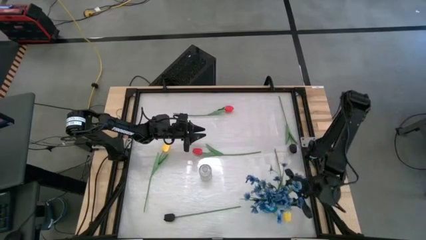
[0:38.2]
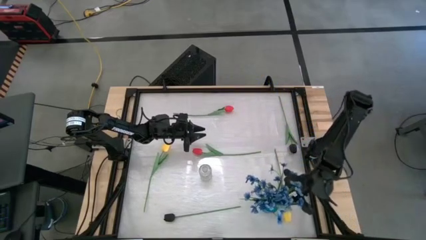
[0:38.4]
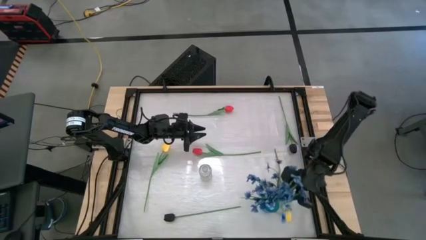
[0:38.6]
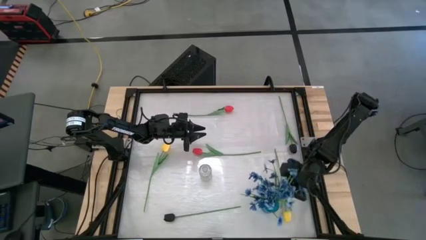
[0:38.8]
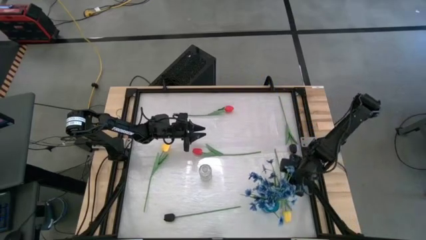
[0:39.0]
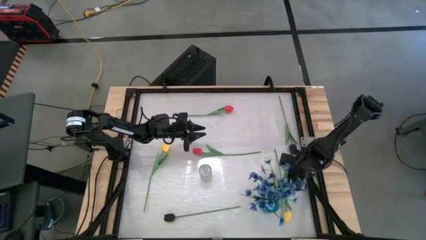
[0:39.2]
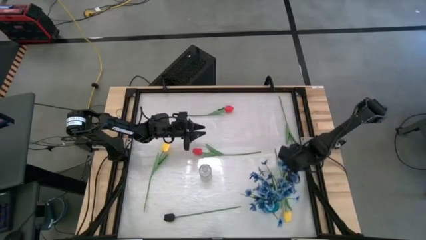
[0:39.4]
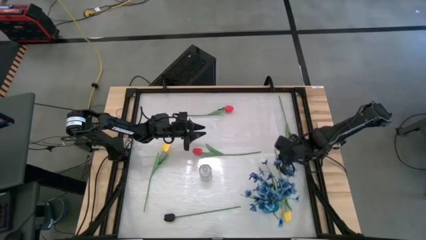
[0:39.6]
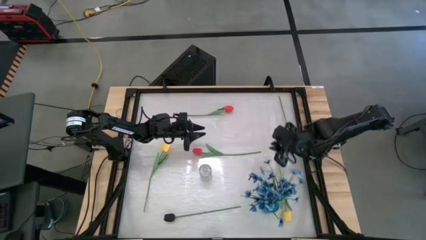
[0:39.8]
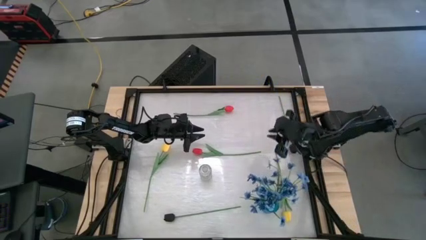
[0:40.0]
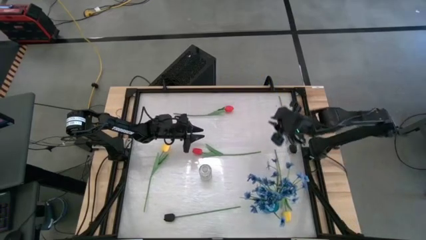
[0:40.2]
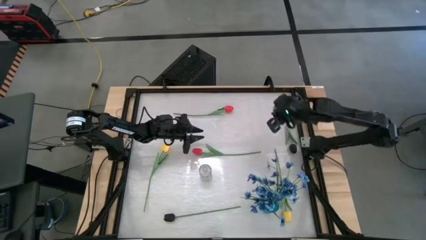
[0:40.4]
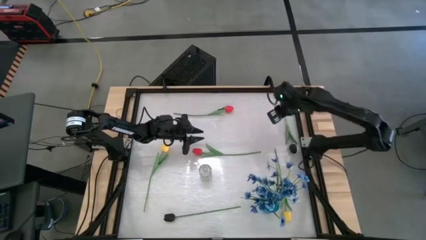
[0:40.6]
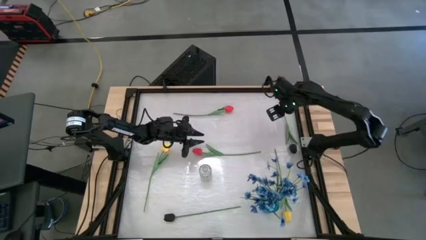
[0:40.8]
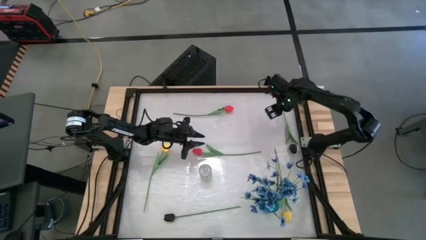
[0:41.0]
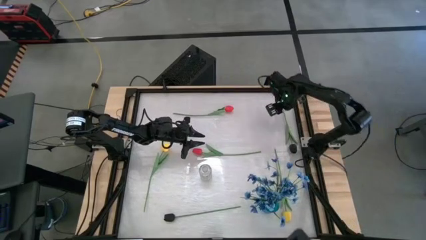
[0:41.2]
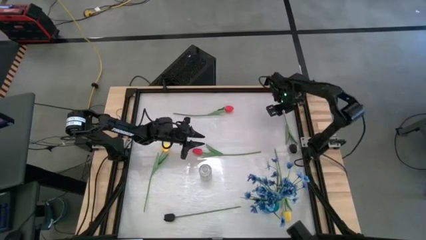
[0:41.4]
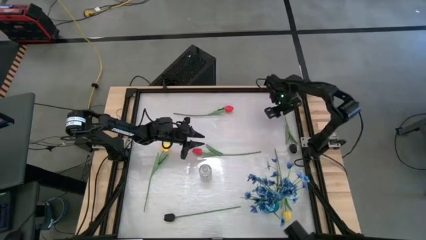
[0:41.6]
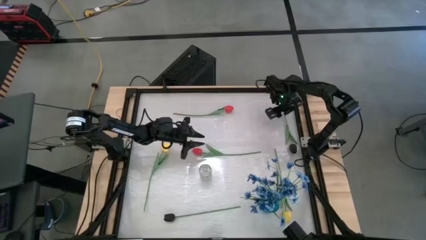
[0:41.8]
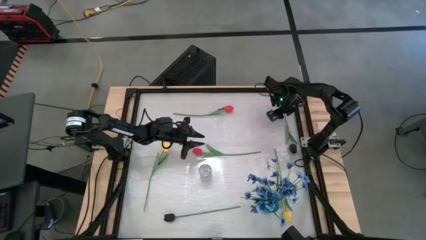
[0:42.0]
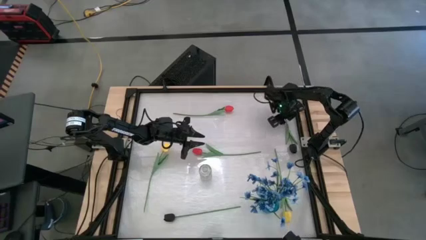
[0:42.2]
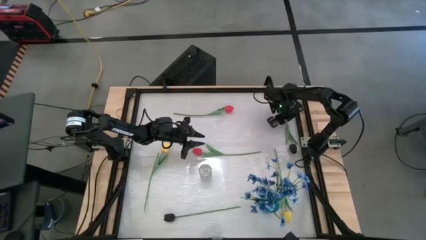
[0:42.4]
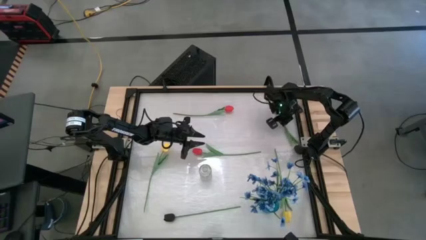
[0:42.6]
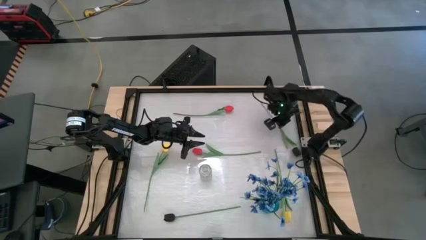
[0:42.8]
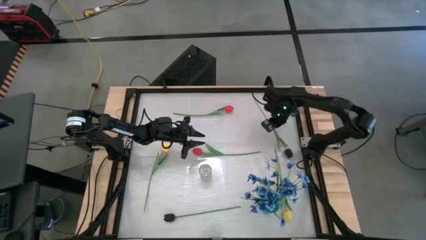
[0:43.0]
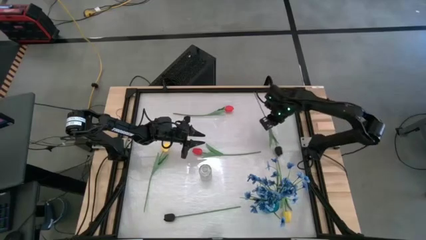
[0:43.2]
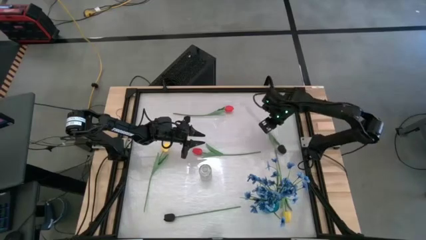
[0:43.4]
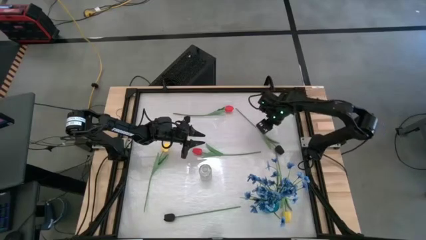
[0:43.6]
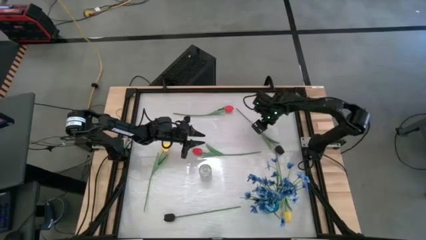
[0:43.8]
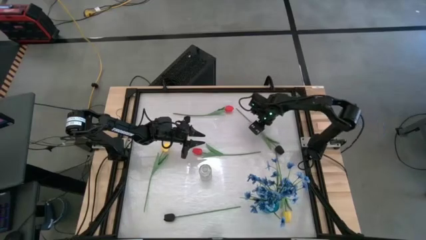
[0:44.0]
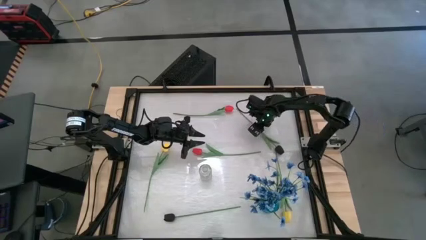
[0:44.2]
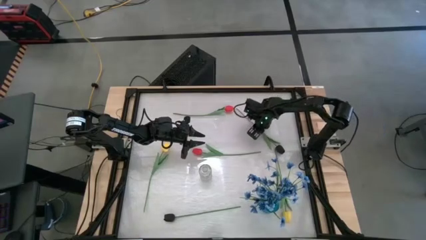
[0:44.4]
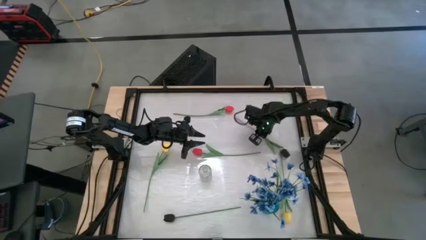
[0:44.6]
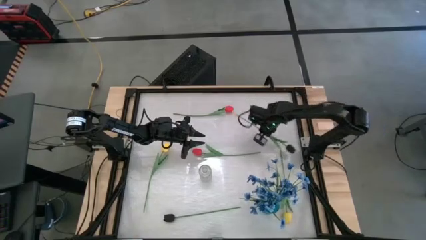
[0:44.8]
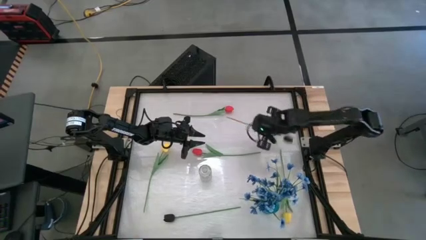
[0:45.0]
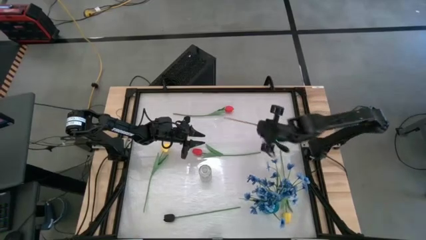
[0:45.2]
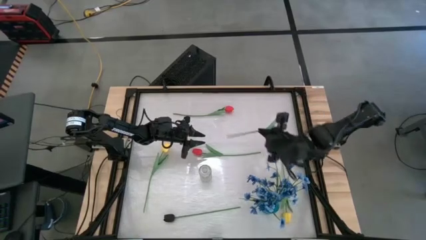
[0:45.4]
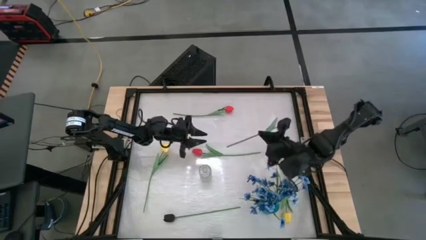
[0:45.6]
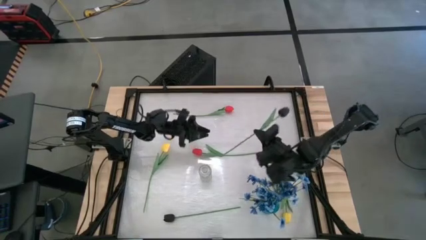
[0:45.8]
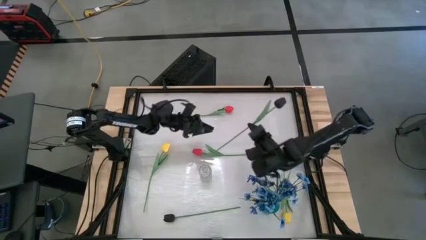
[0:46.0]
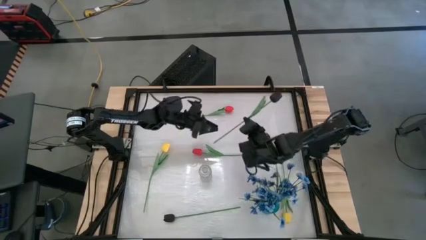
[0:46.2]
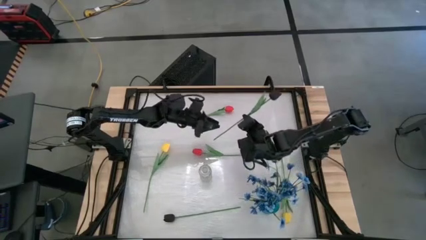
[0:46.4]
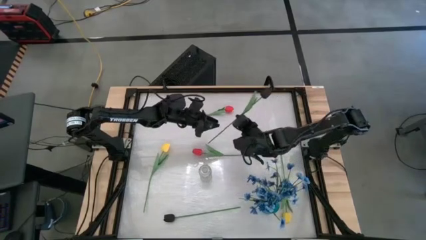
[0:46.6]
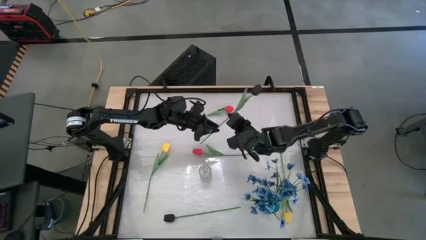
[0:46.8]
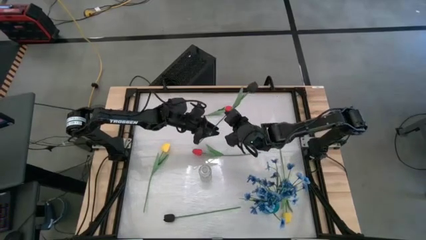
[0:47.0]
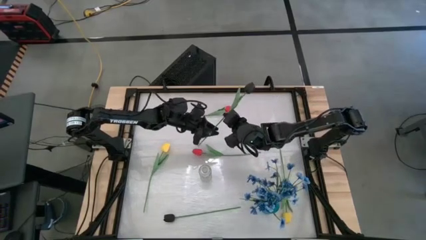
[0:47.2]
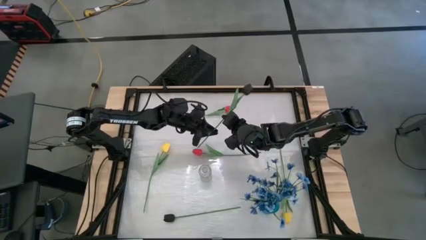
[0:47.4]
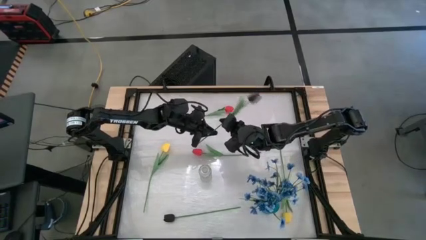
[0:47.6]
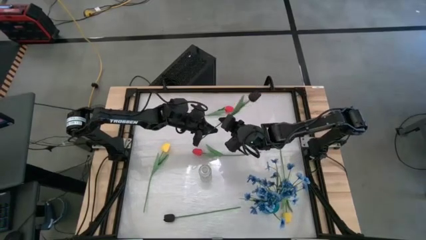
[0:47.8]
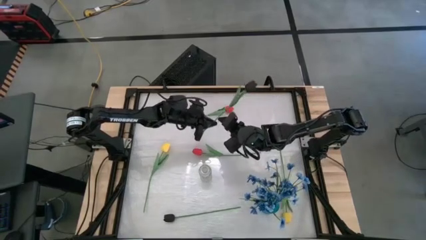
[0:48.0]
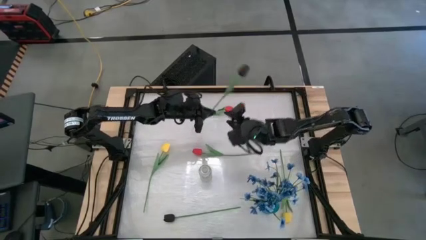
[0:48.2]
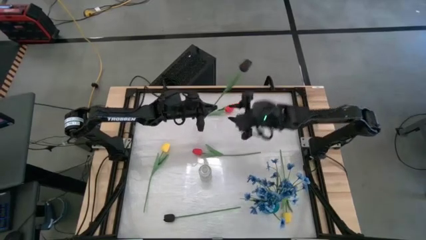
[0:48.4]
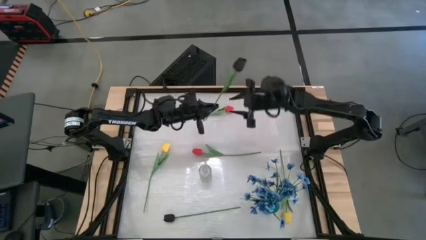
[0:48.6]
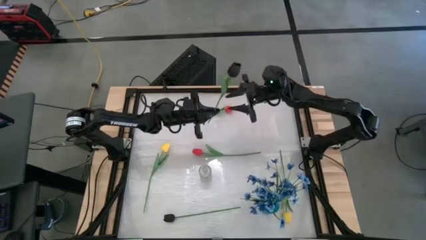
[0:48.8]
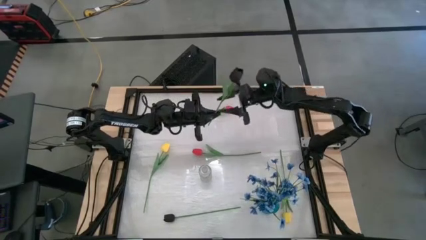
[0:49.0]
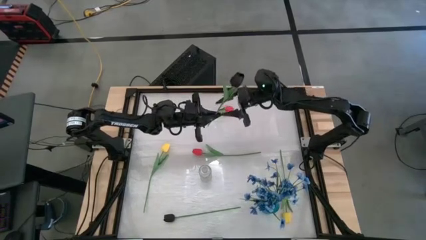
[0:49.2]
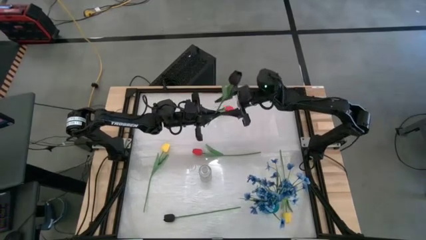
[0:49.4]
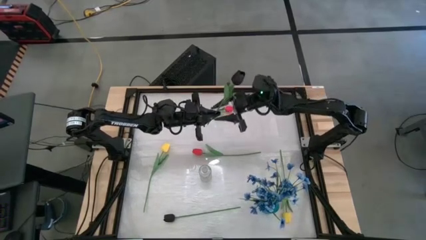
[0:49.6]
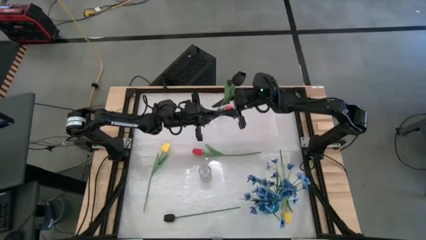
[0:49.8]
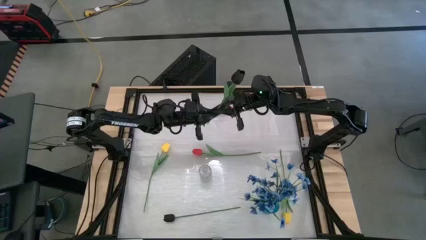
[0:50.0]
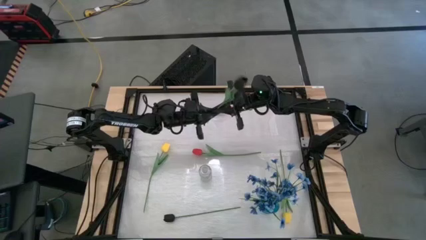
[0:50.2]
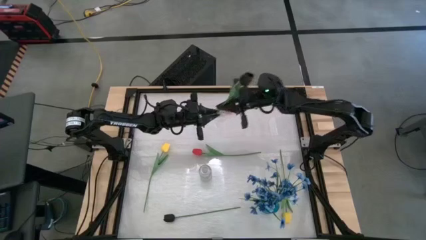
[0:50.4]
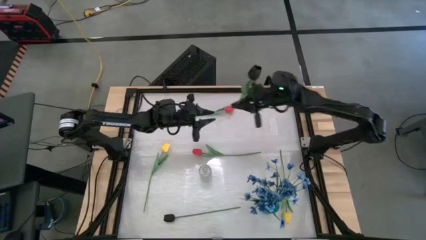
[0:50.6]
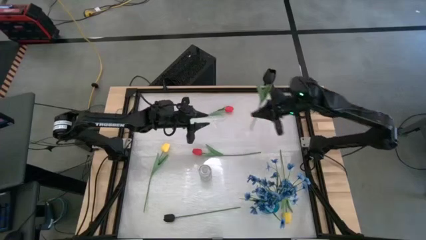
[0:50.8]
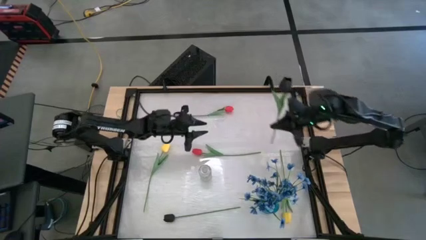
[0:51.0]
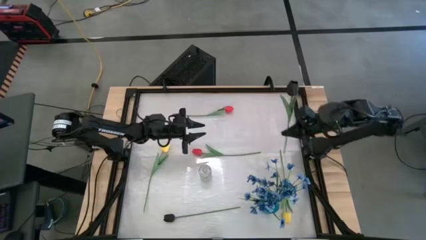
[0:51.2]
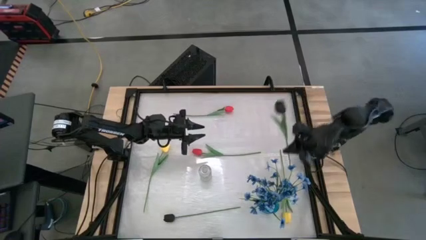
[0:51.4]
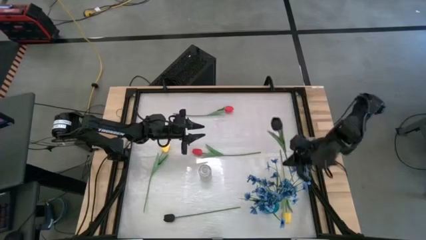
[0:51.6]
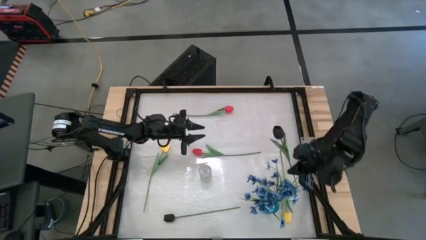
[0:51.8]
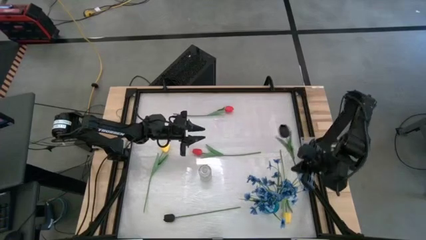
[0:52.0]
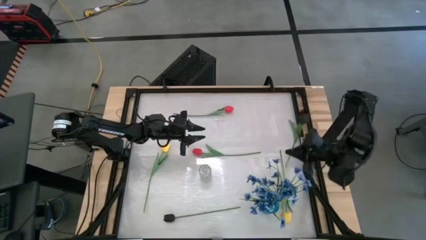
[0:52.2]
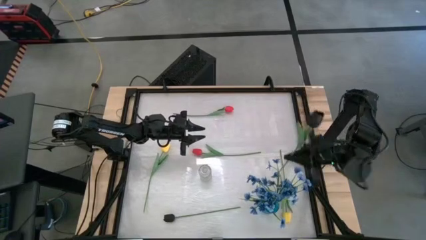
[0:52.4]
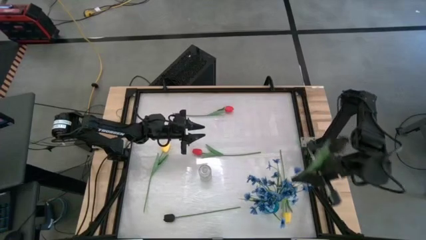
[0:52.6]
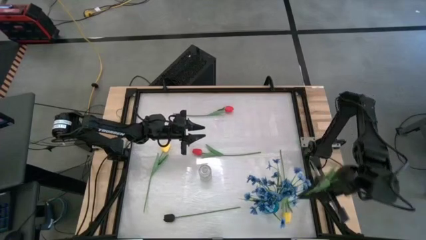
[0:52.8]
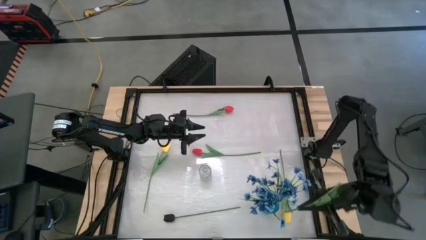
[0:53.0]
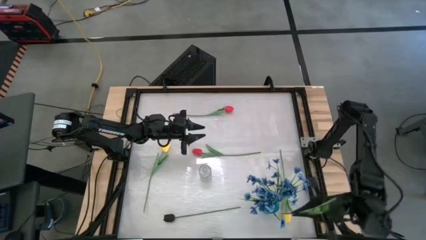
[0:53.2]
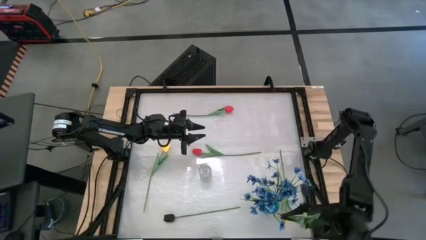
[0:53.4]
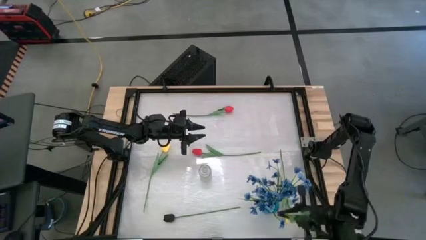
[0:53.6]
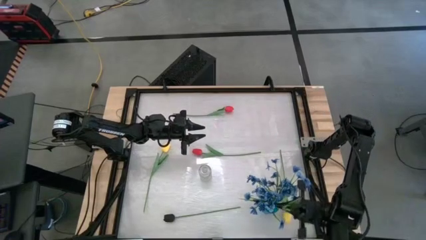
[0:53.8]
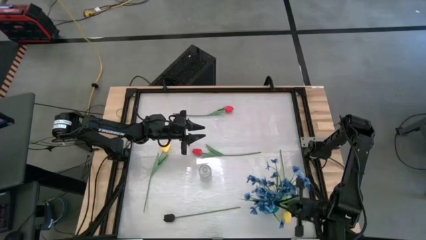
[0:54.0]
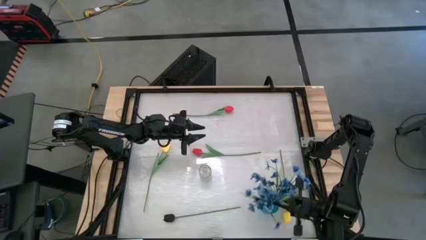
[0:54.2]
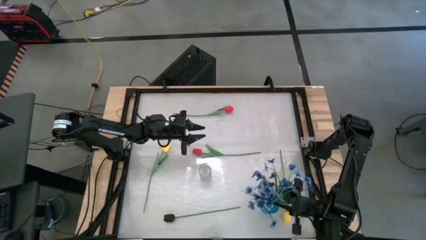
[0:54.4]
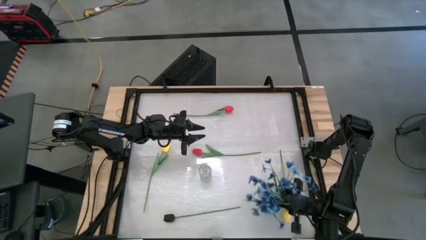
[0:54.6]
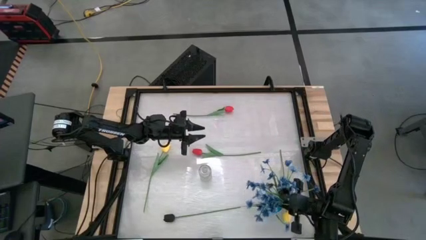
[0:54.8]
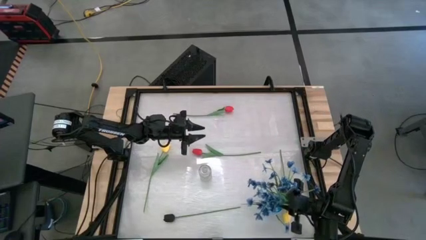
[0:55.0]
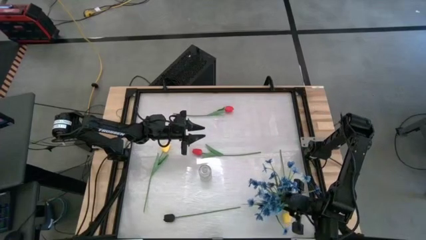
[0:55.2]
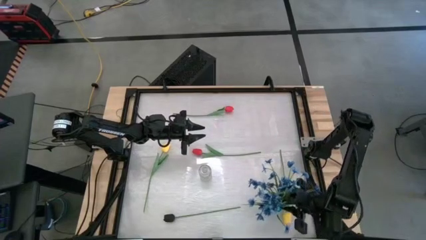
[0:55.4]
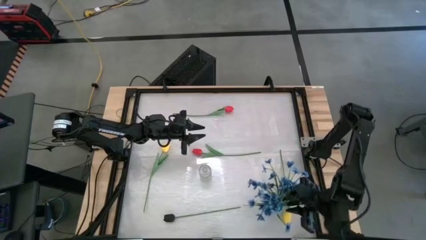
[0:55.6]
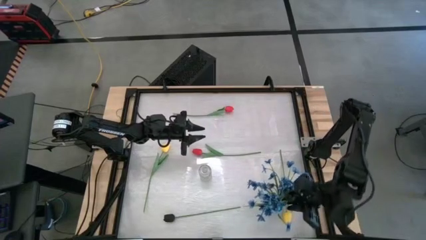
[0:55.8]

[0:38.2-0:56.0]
Task: Sort flowers into vase by color
Put the top black flower into the blue vase
